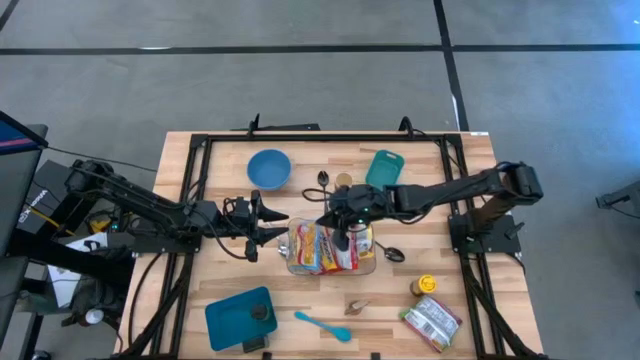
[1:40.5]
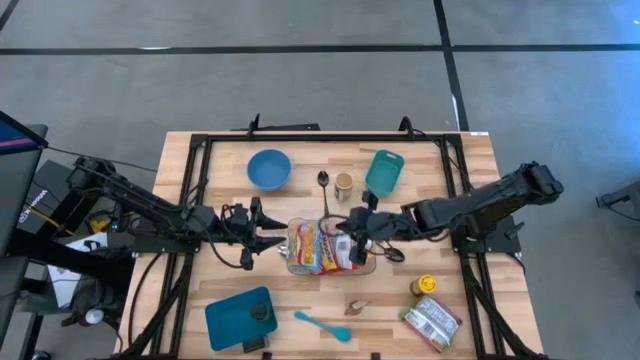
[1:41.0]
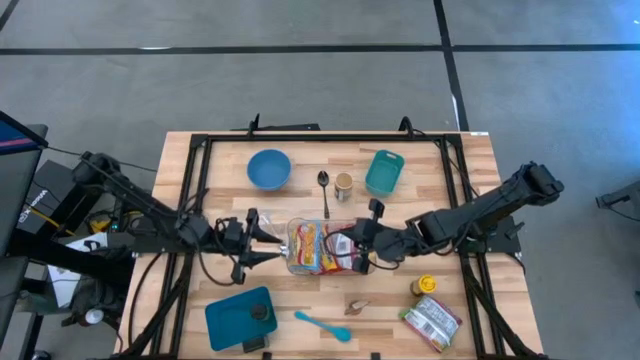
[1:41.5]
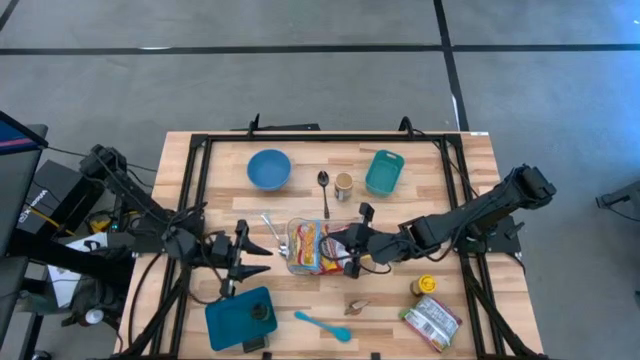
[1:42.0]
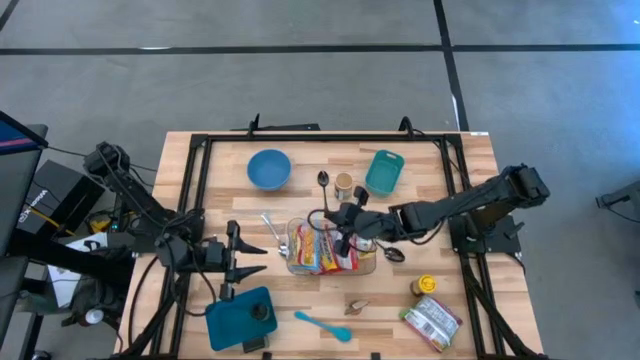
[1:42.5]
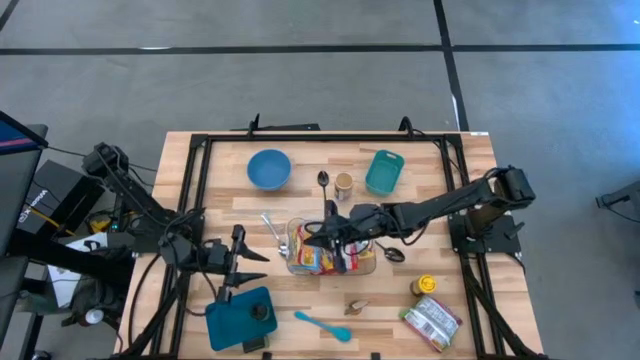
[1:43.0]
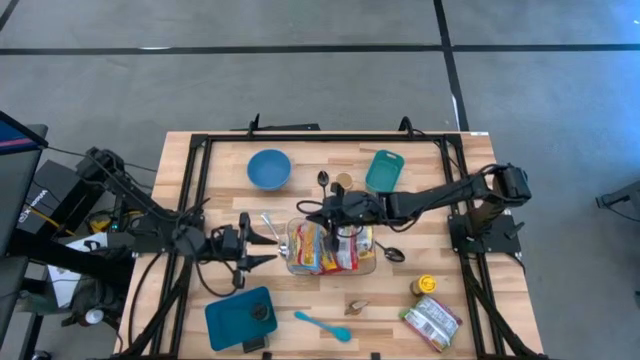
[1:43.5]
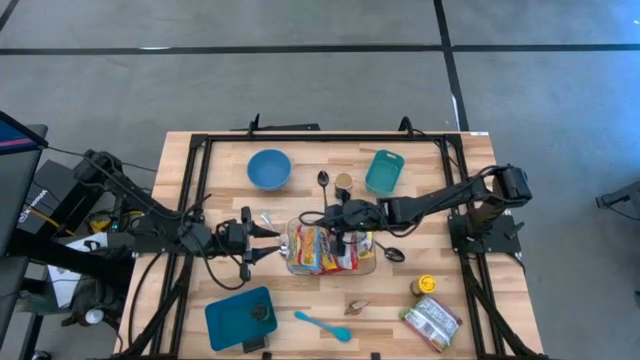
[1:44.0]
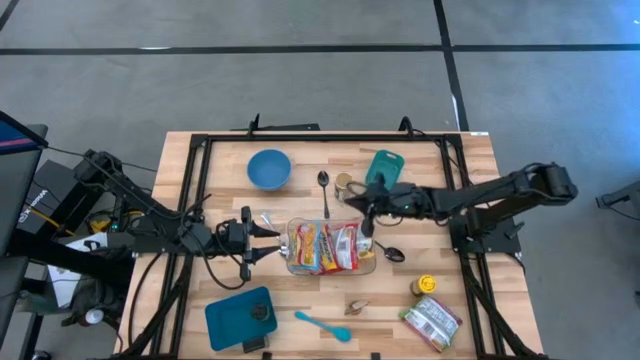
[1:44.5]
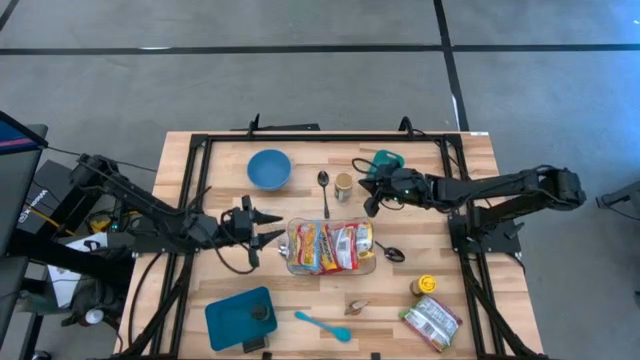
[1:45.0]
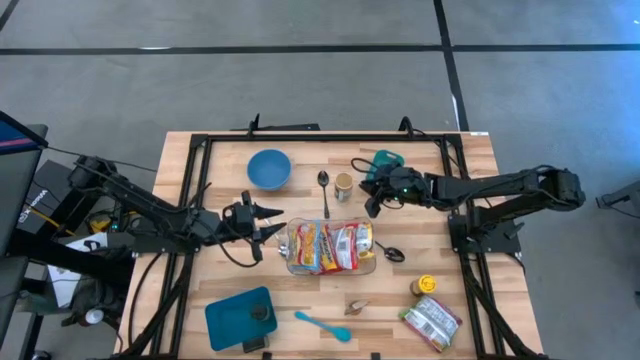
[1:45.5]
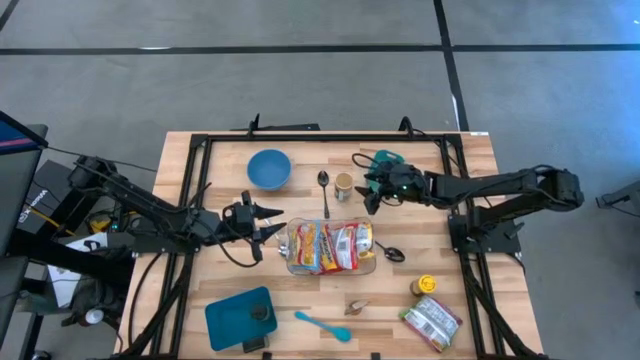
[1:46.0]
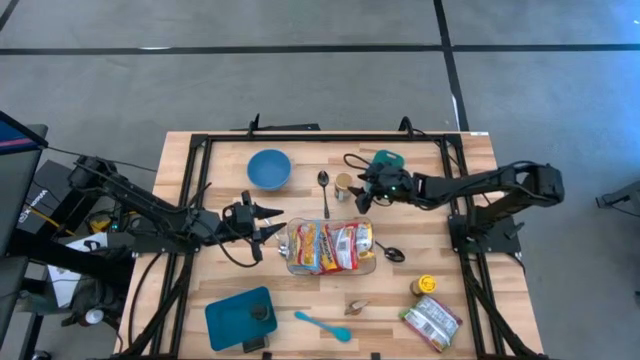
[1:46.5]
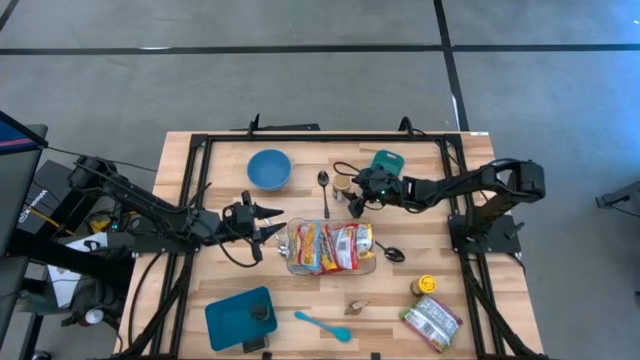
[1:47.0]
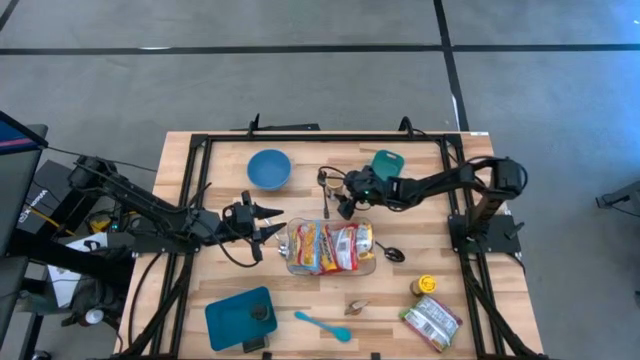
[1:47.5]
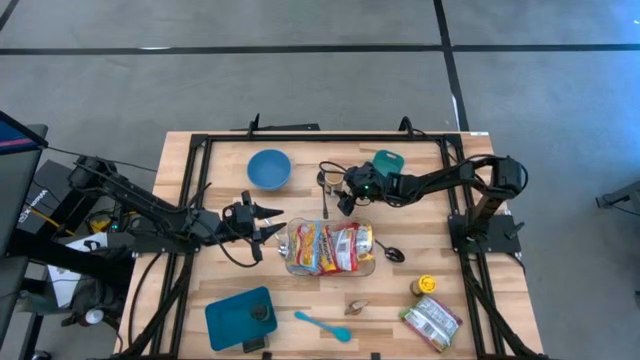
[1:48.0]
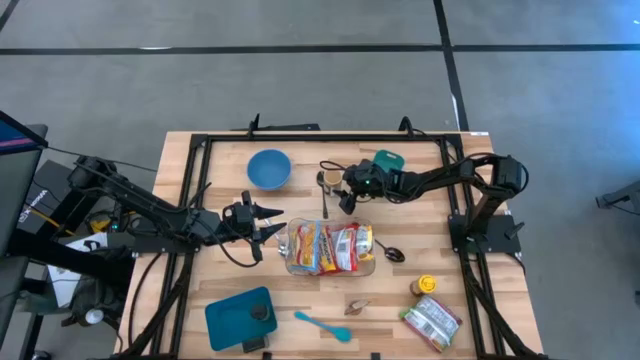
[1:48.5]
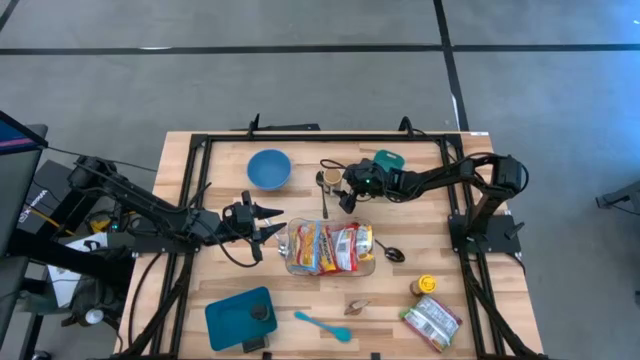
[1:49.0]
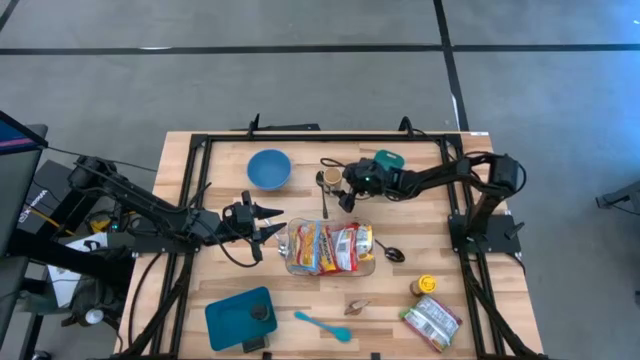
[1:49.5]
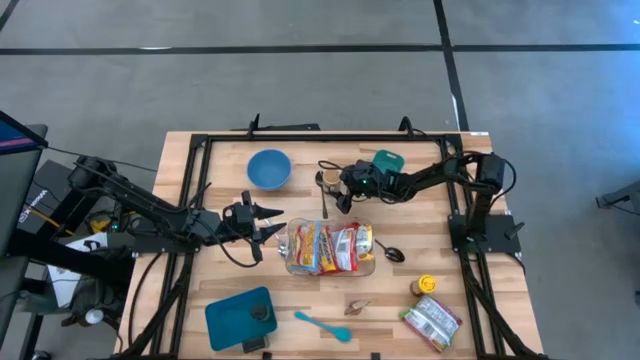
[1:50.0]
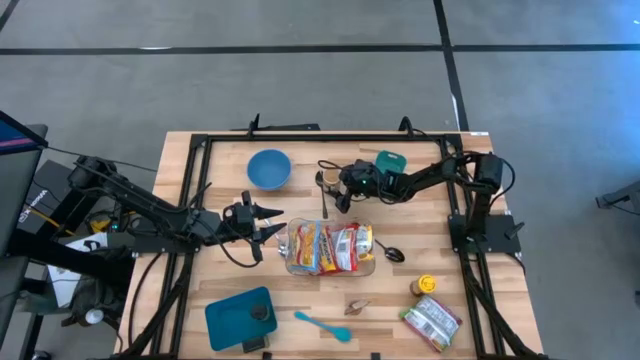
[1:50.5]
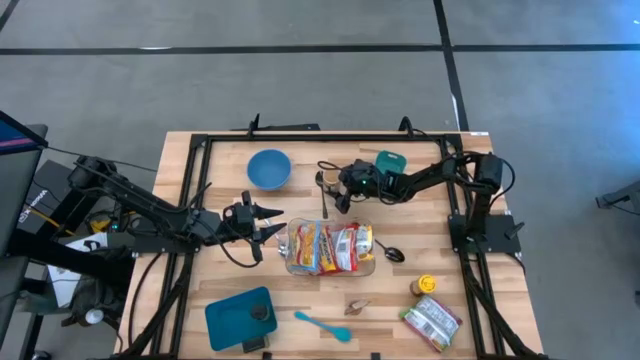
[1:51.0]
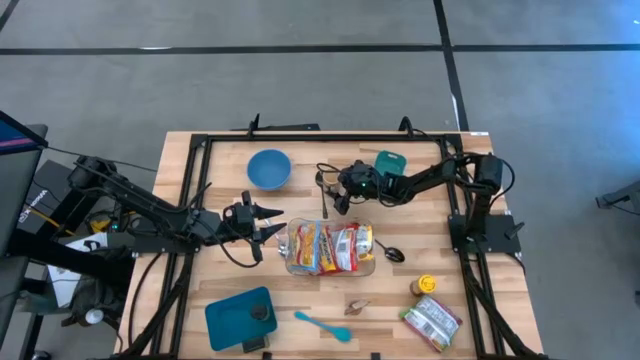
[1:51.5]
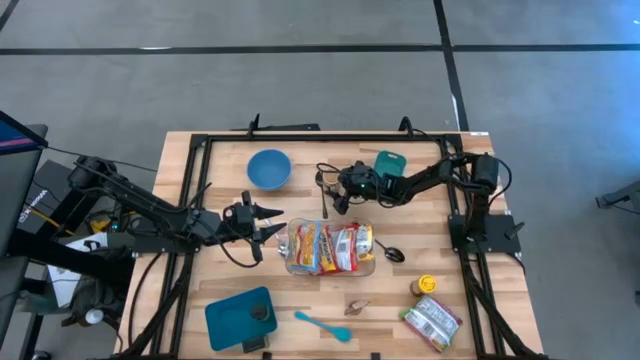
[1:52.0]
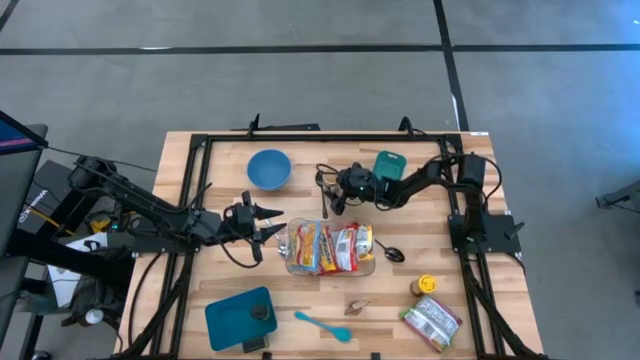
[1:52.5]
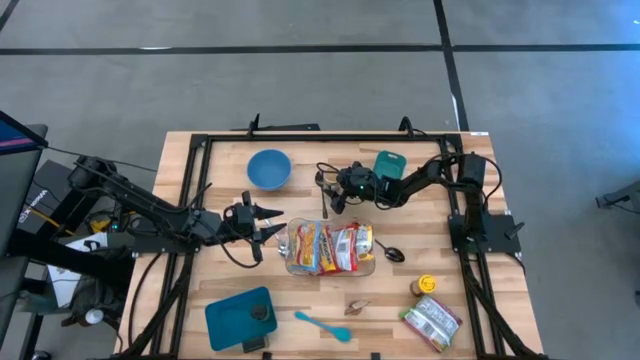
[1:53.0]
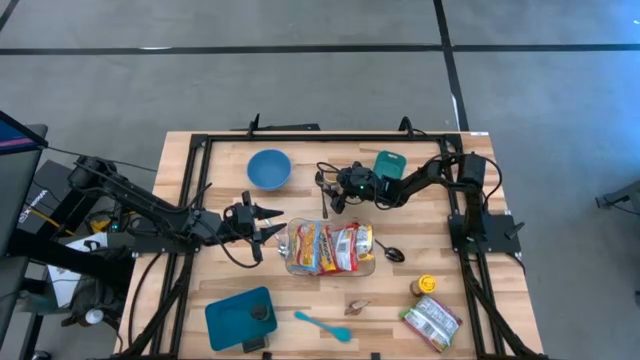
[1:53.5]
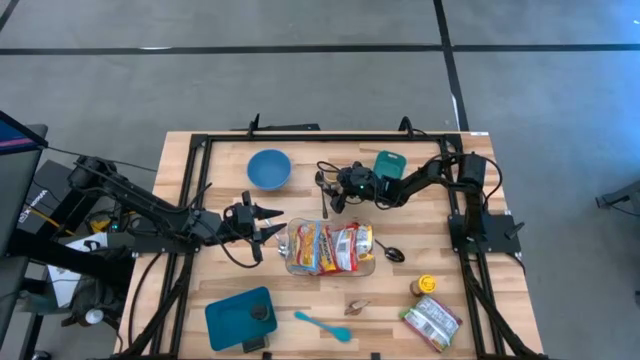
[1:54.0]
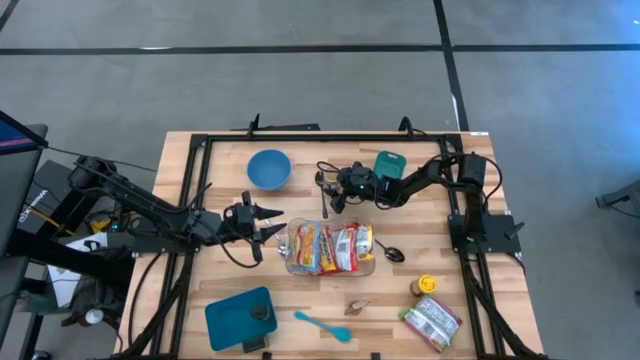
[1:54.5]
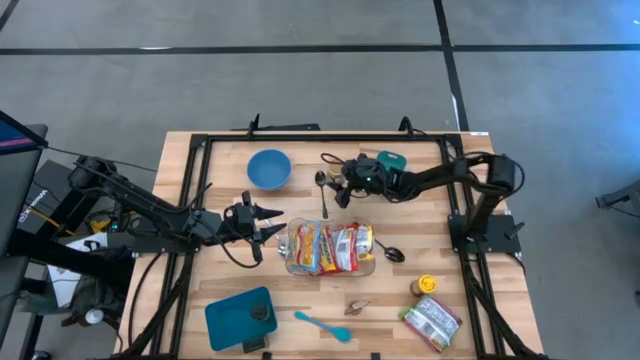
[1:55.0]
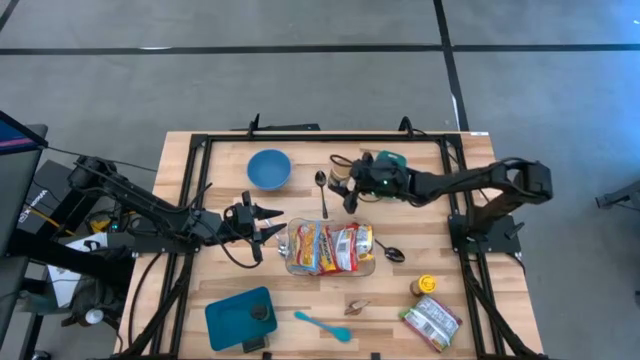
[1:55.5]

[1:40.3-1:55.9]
Task: Pick & Place Food Item
Put the golden spice bottle into the dark blue bin

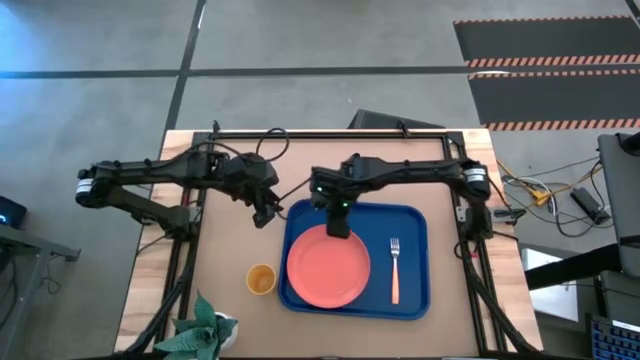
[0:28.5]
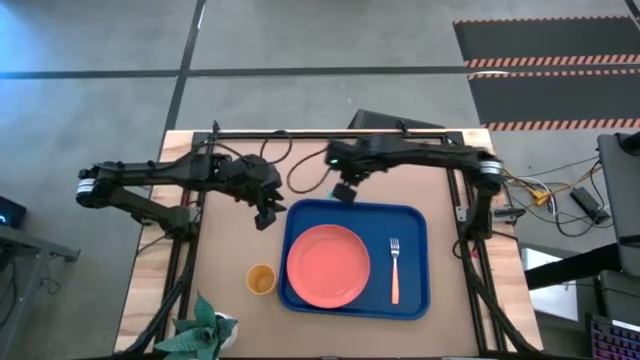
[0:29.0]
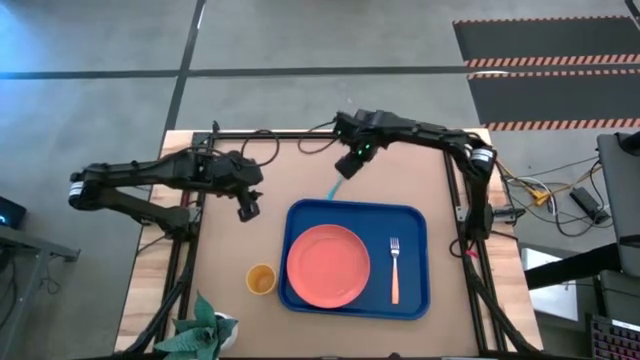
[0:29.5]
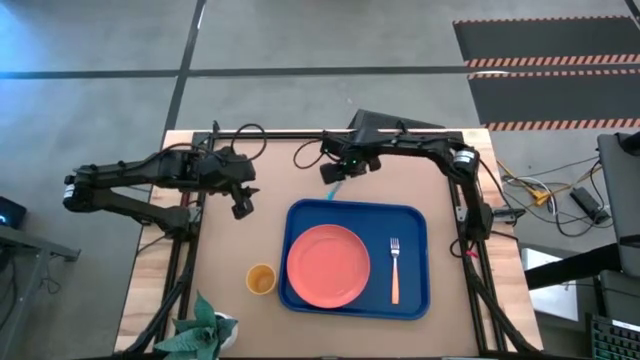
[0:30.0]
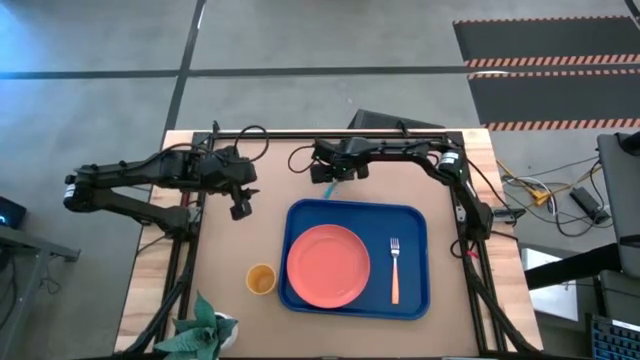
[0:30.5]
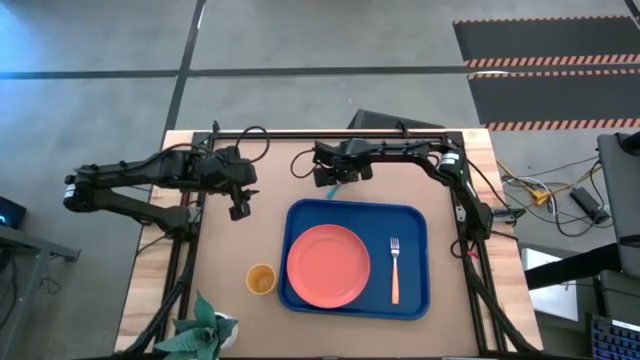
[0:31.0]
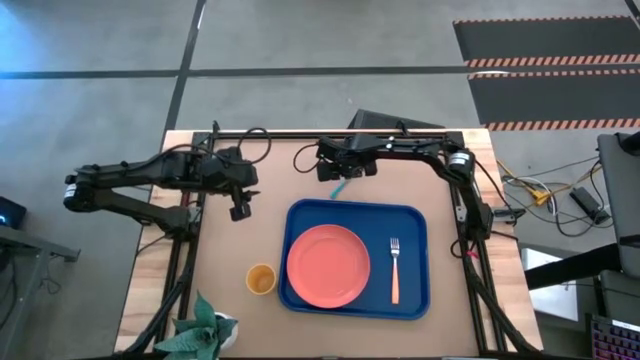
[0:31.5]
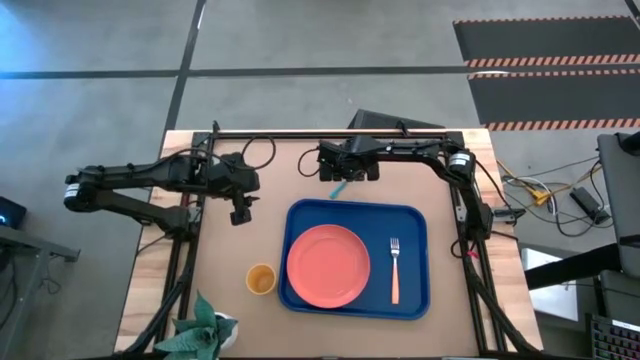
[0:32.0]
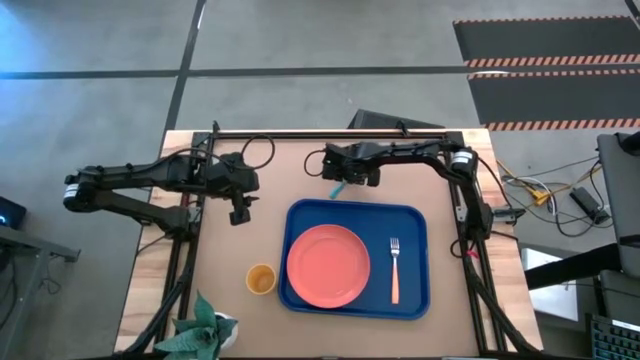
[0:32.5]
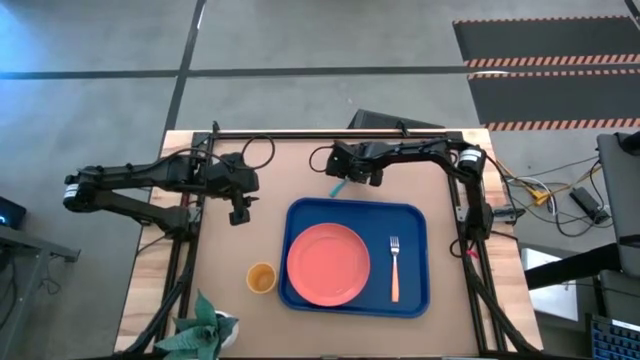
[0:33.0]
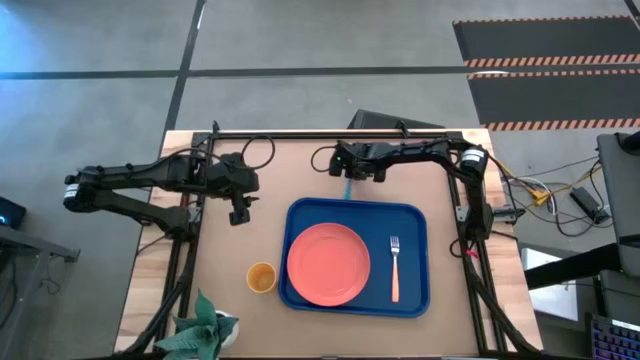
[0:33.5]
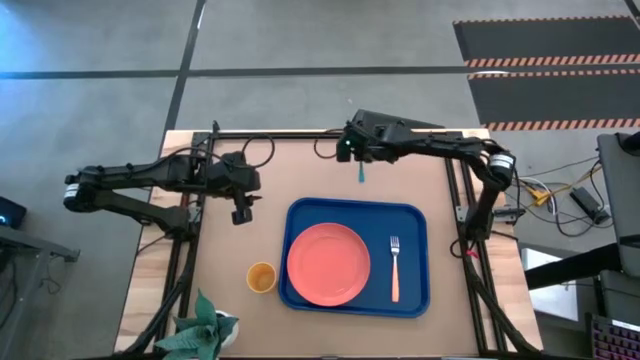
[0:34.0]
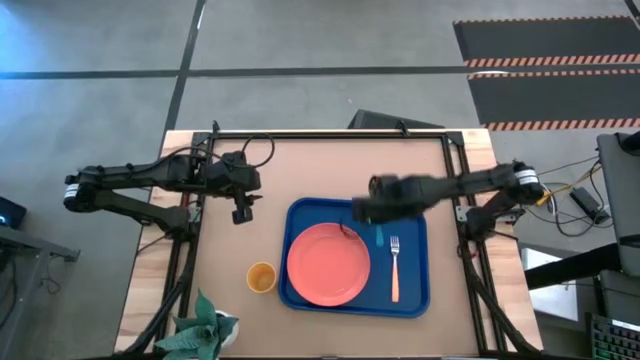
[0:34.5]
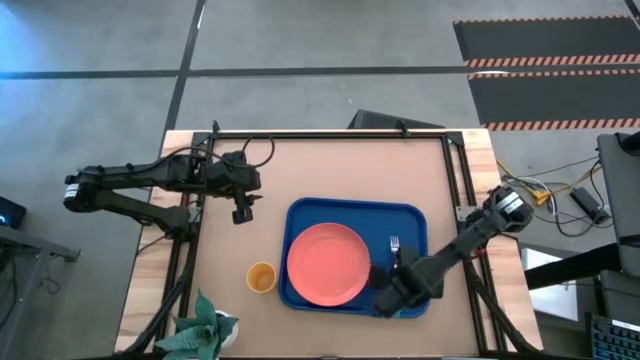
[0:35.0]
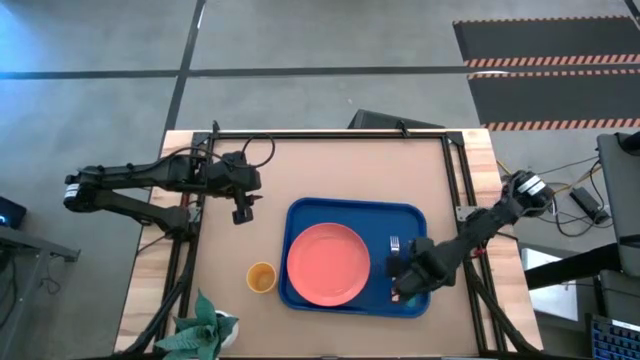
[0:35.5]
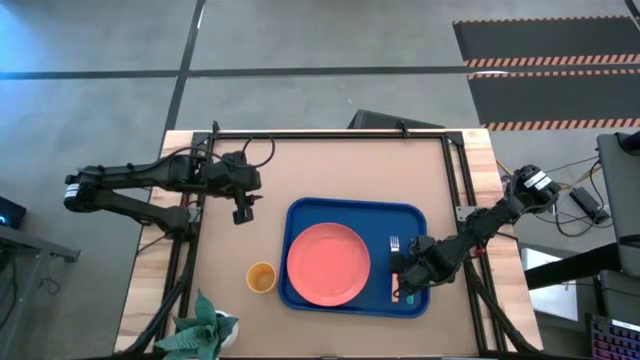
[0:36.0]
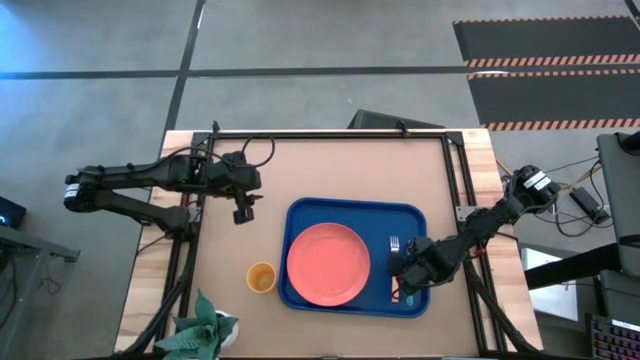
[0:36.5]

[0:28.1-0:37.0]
Task: Pick and place plate/cup/fork/spoon on tray
Put the blue spoon to the right of the light orange fork on the blue tray
